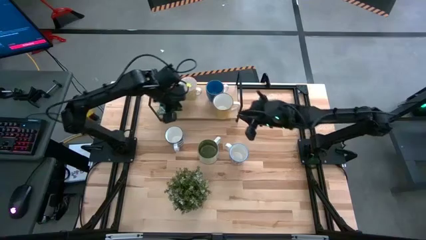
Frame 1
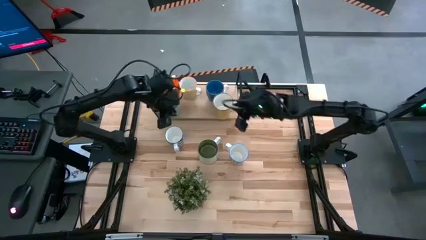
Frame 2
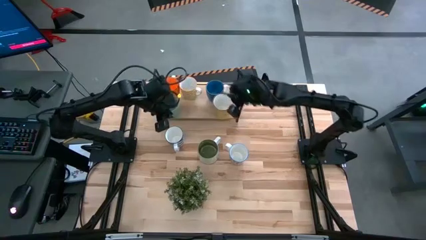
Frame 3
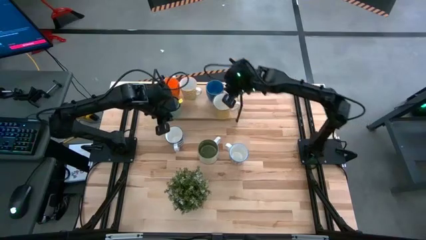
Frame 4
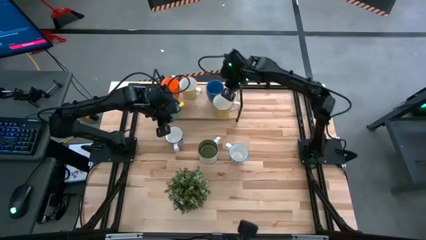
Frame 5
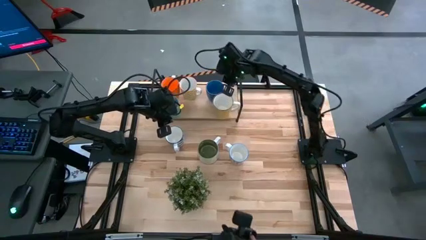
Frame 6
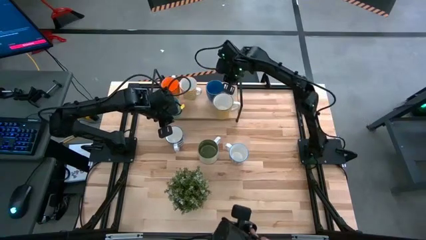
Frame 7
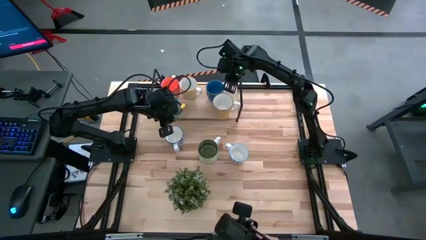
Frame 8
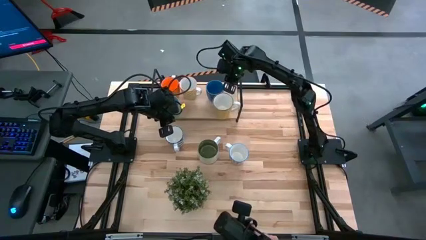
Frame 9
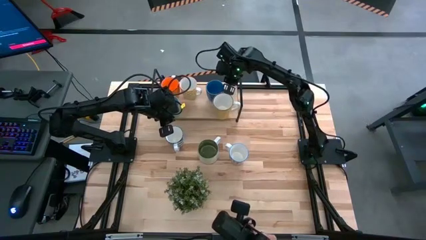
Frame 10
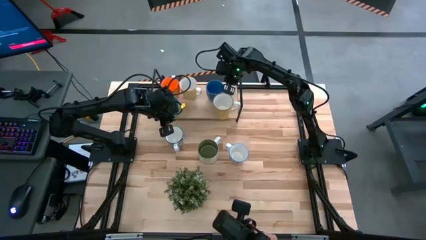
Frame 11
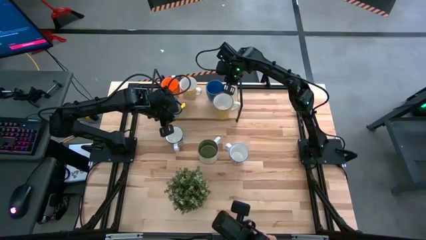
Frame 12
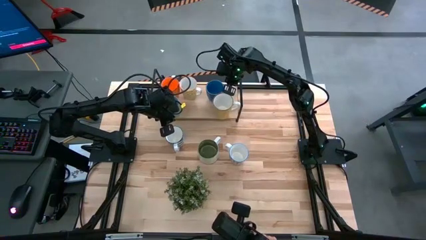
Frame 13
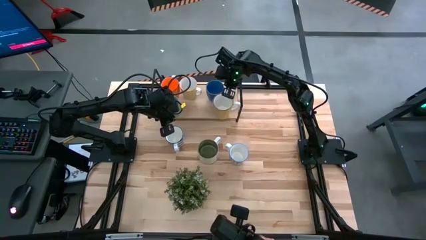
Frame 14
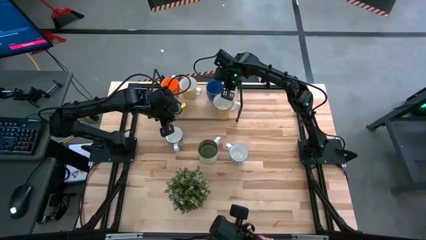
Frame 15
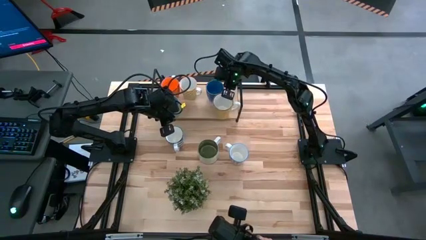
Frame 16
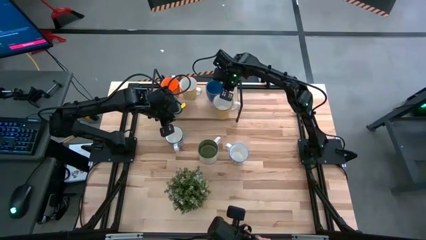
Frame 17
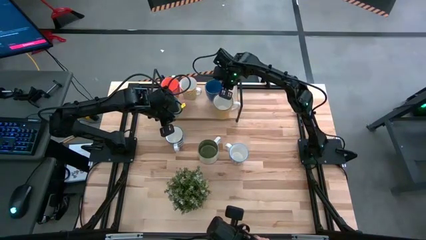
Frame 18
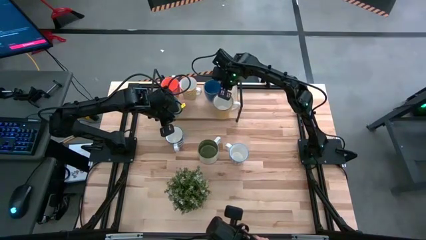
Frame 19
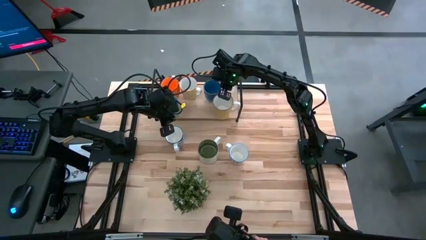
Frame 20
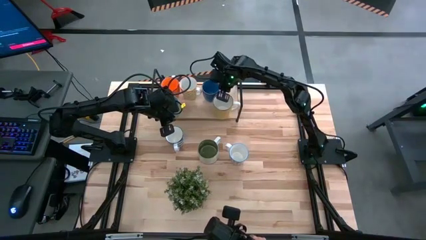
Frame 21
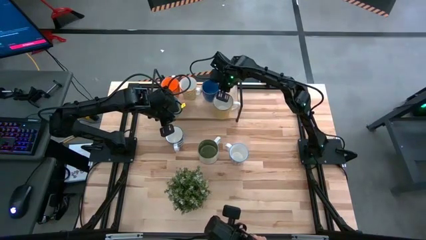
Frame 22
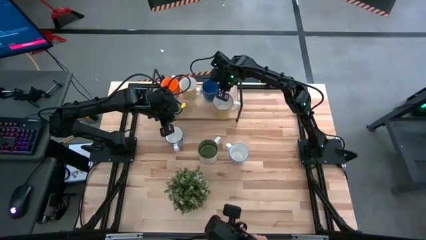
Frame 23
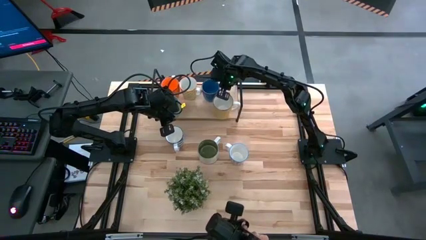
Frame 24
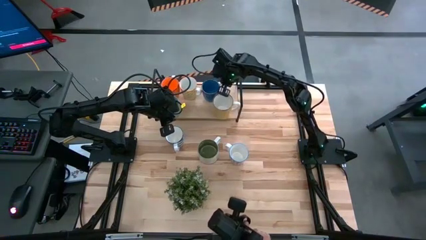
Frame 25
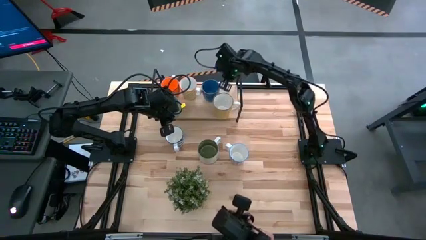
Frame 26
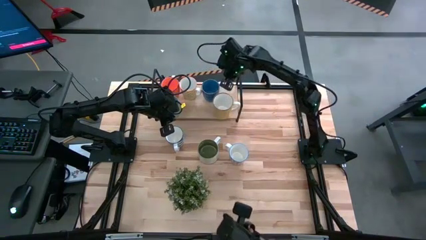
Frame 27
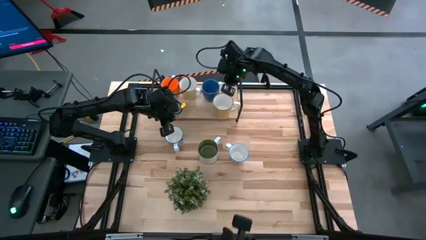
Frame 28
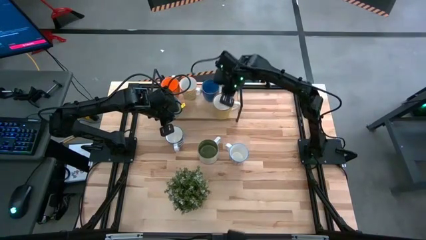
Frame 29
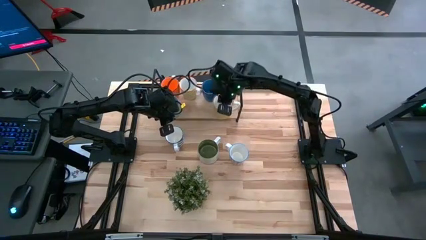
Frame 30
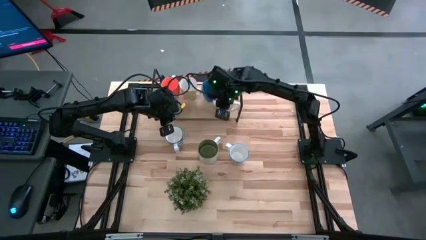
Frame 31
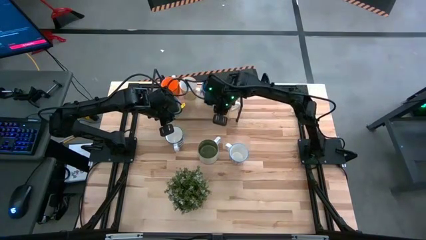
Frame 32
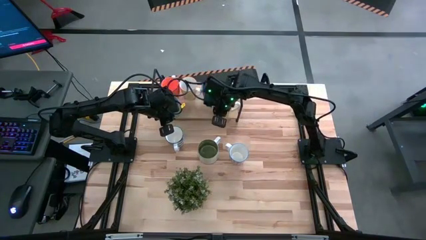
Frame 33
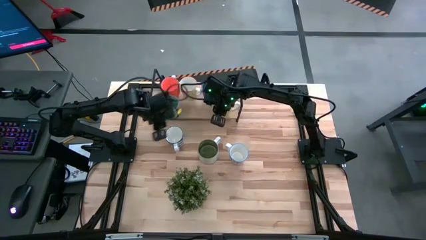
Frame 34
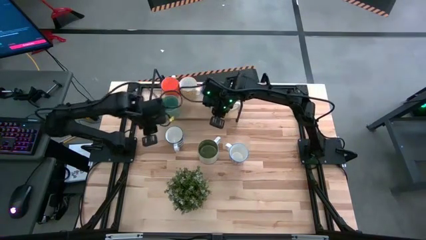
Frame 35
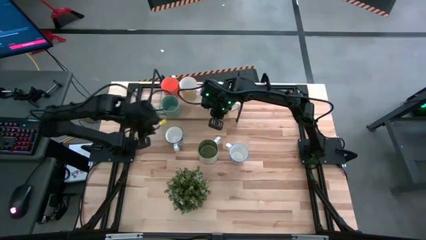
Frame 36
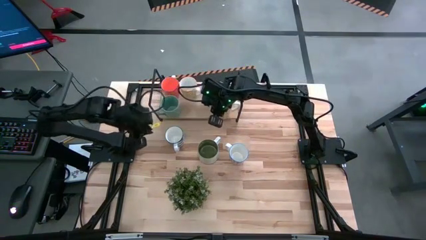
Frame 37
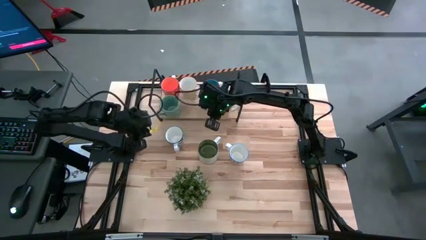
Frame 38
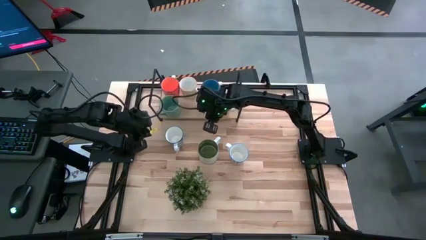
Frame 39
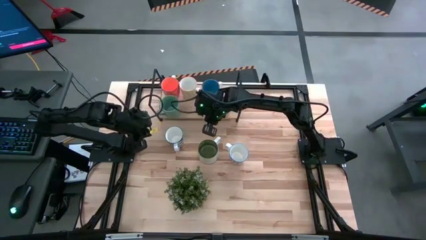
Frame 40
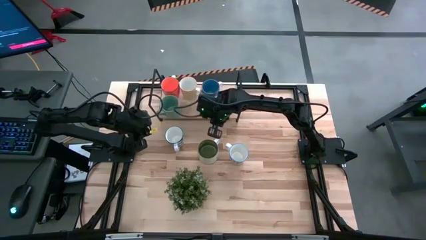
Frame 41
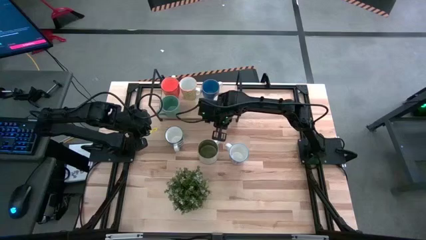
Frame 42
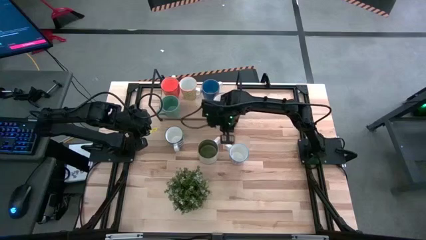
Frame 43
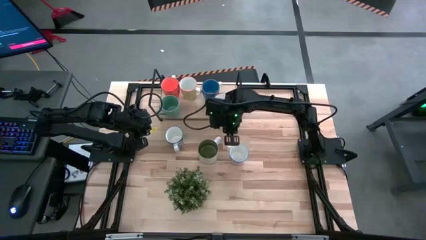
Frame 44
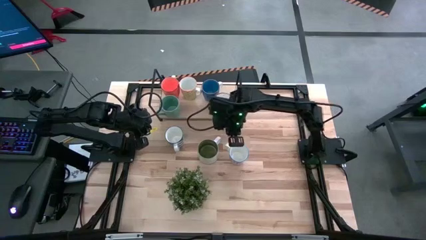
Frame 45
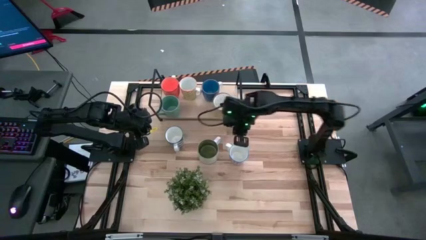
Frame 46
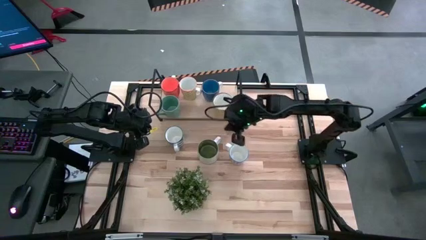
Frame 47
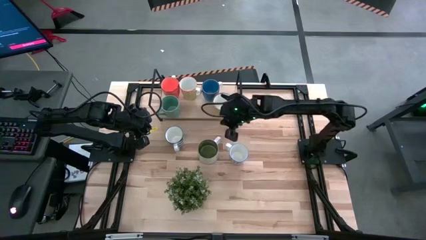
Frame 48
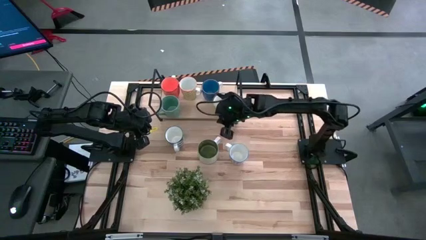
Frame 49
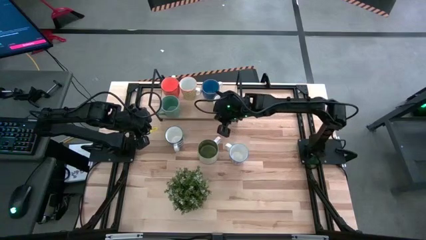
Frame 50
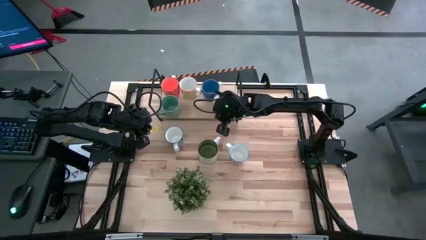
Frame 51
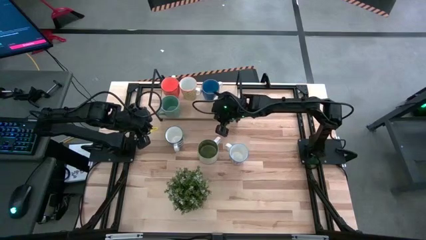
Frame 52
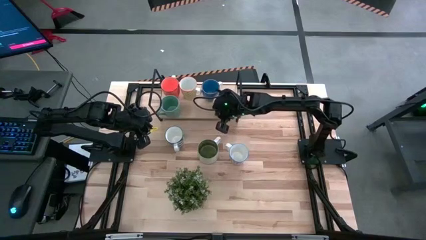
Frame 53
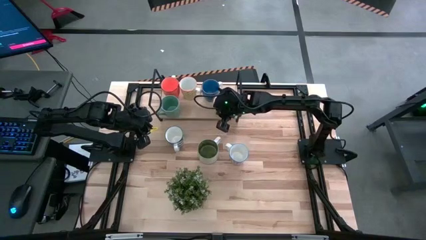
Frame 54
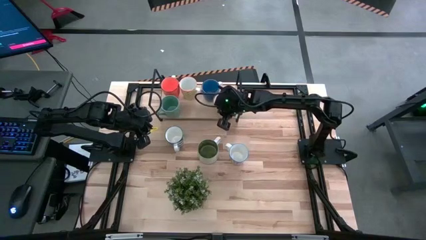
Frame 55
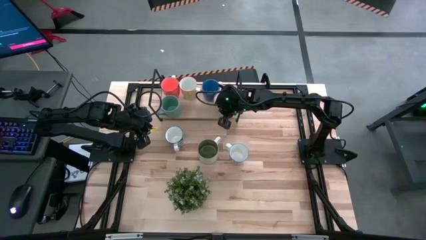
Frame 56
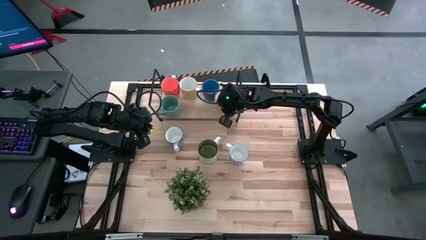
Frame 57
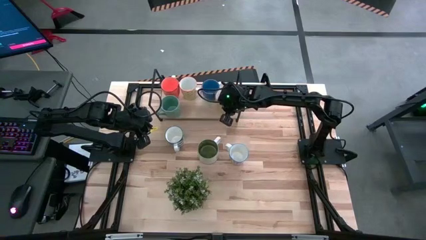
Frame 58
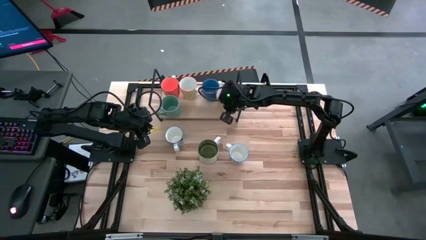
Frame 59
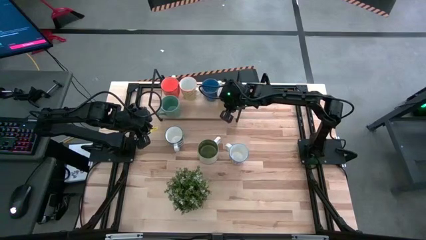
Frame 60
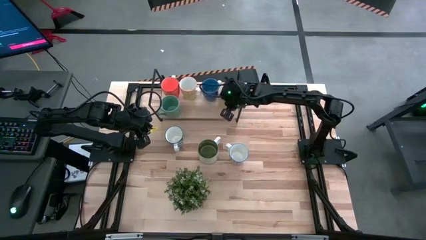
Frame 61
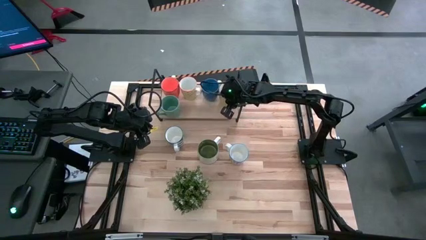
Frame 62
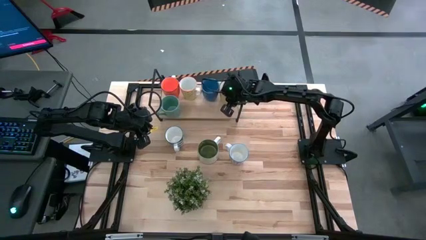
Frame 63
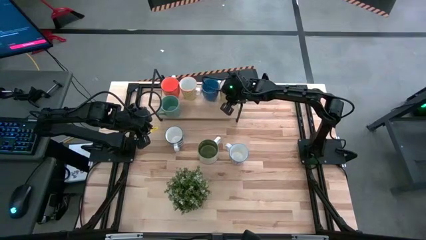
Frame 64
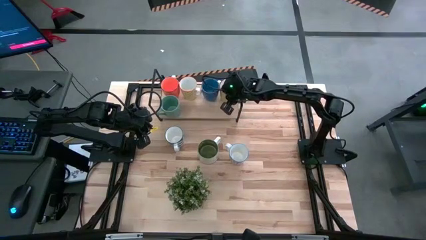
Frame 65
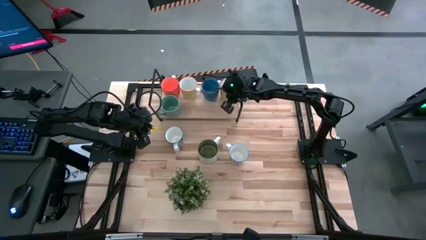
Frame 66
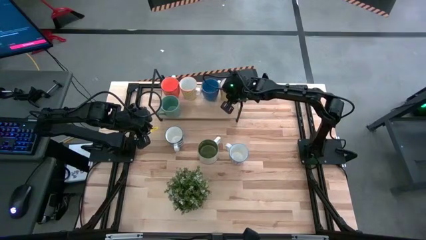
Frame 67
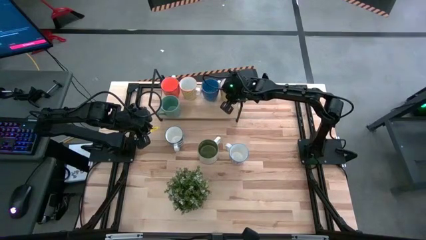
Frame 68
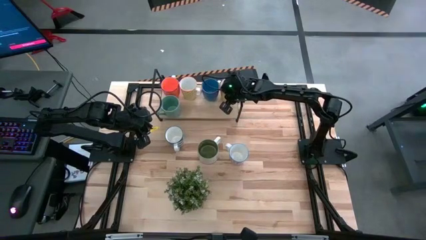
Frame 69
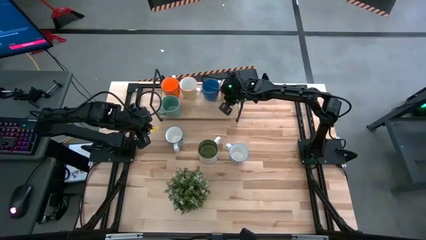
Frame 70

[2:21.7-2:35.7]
Task: Place coffee mugs
Adjust the colored mugs on the shelf

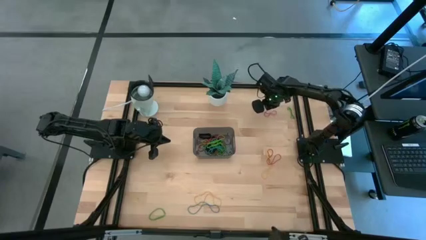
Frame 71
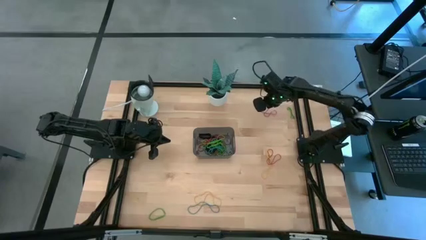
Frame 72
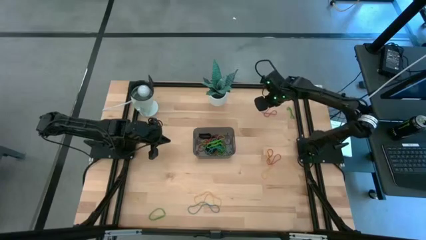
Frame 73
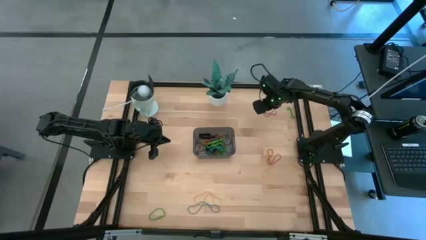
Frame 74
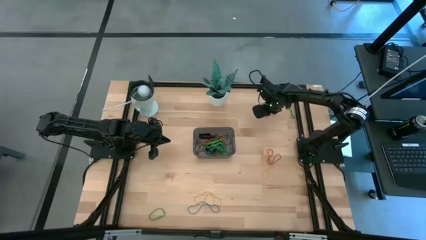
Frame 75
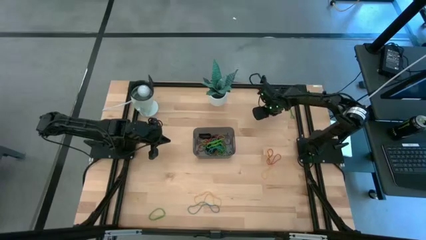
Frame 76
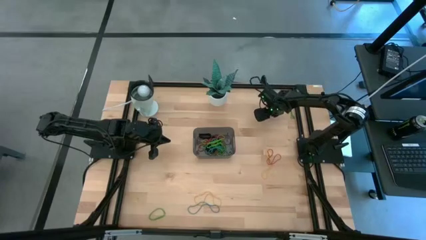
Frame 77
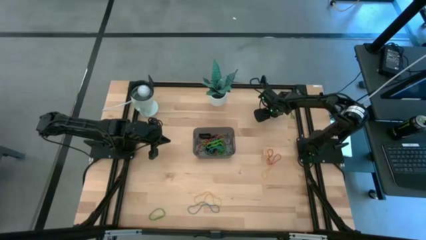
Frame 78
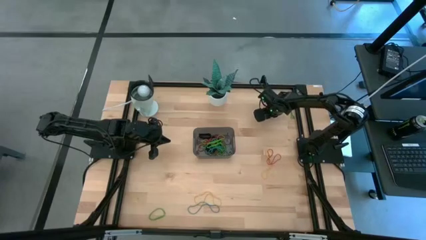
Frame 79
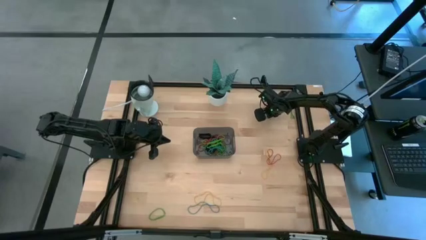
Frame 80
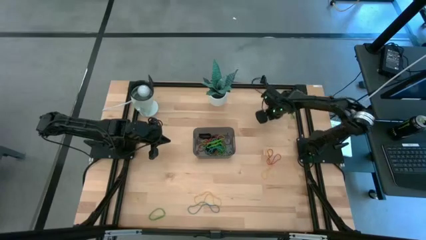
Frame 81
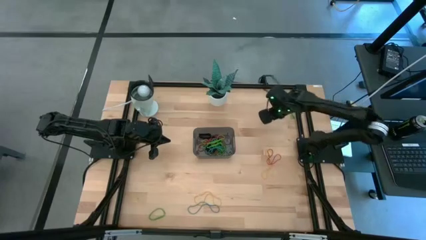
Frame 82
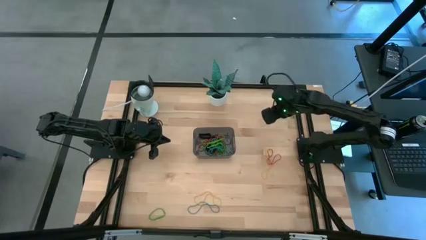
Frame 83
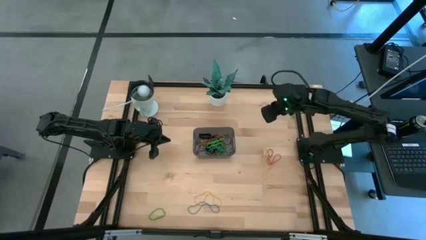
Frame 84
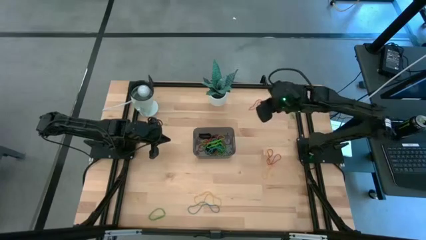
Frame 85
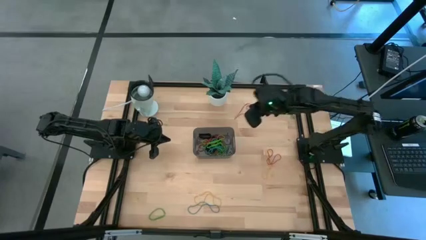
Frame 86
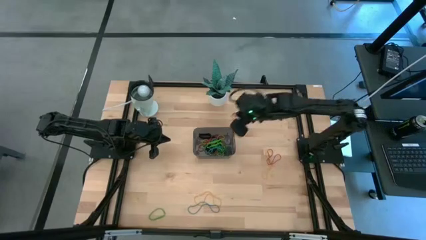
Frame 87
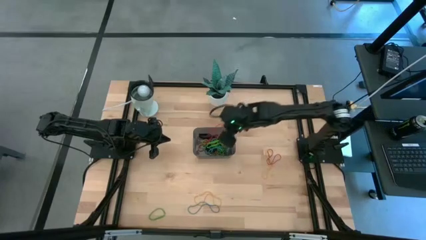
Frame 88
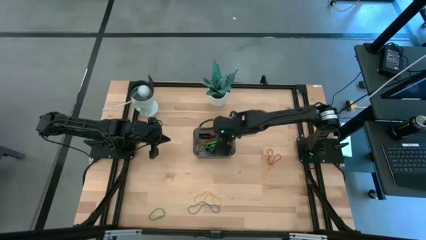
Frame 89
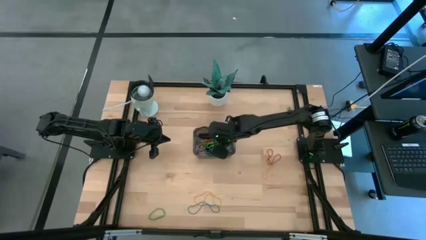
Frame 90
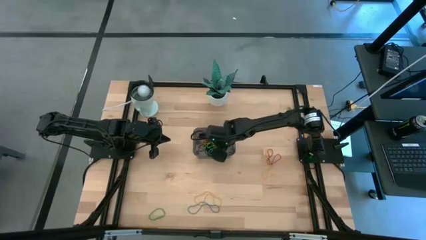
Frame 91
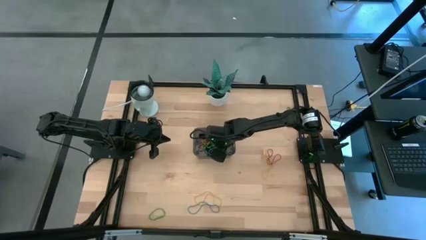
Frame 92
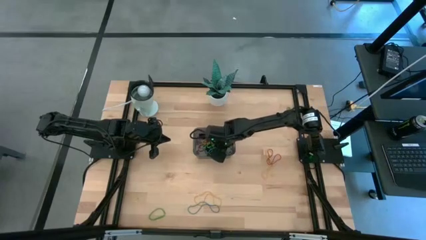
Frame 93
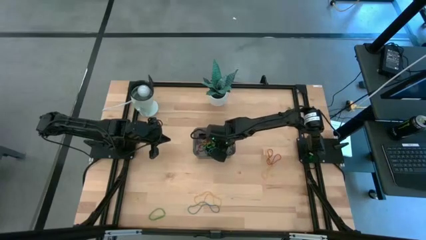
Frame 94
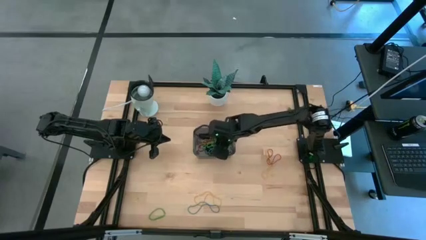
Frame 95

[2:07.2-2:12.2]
Task: Pick and place rubber bands into bin
Put the red rubber band into the black bin
